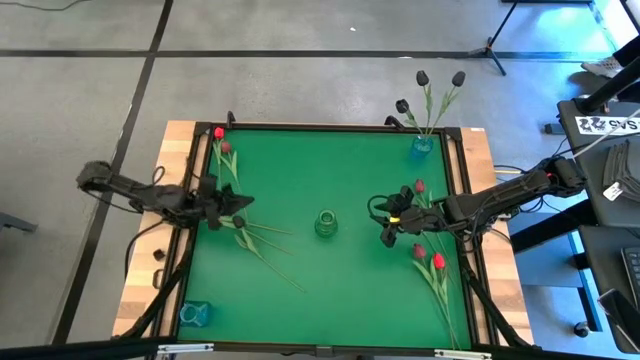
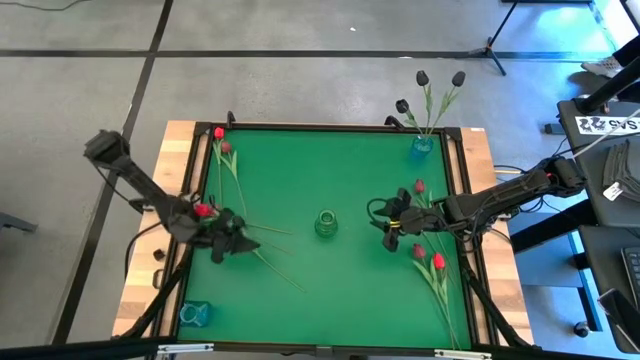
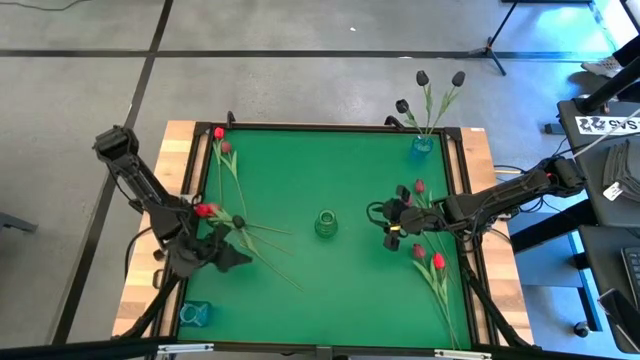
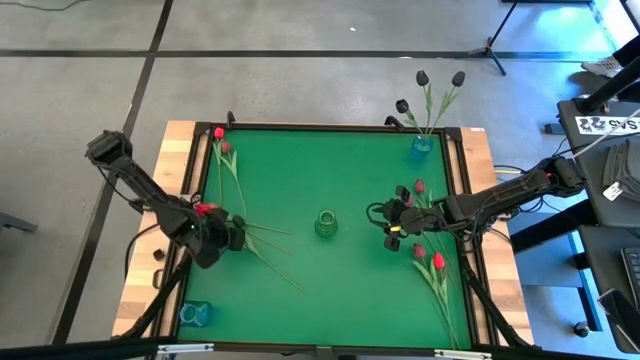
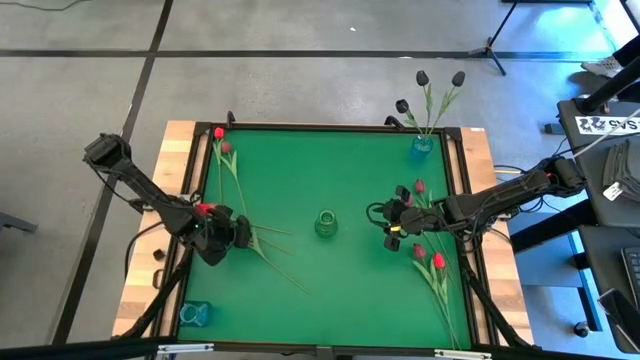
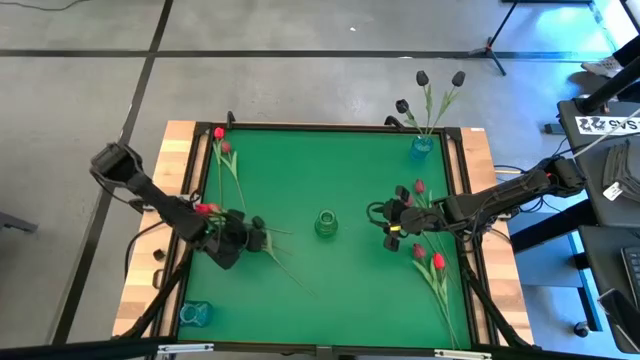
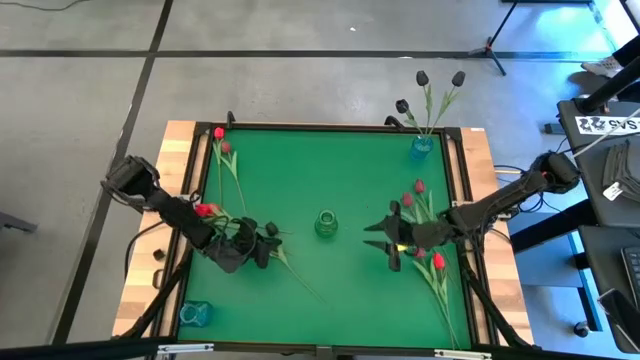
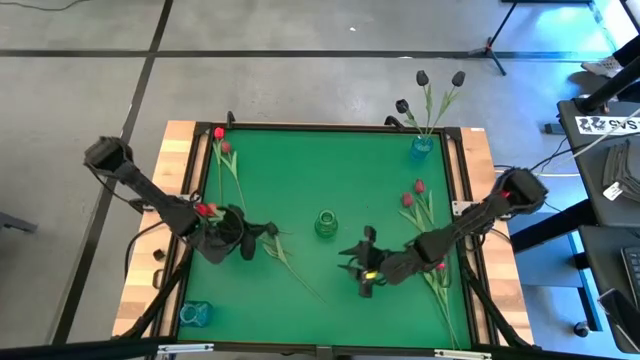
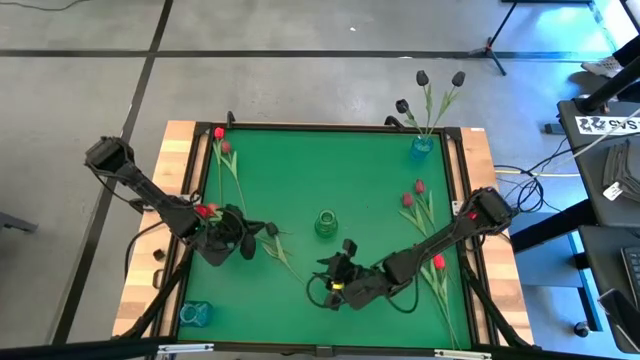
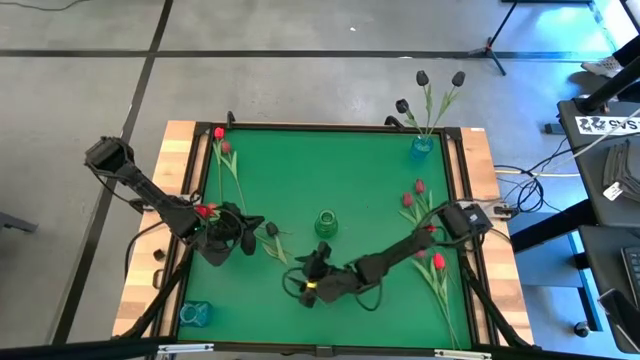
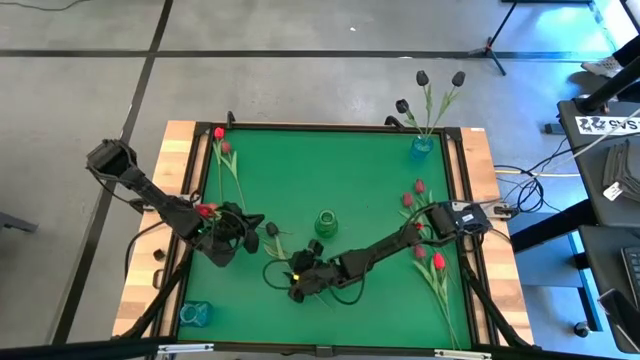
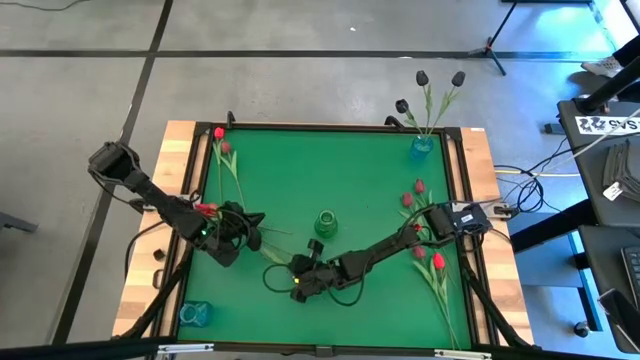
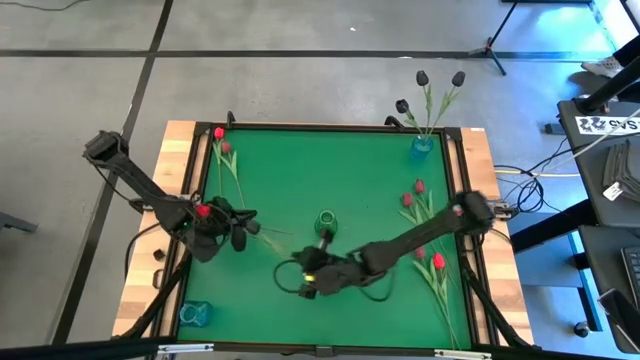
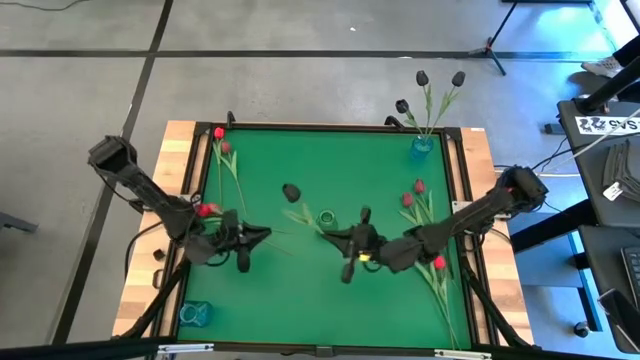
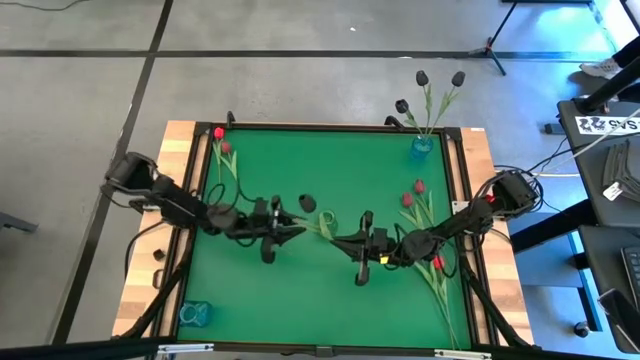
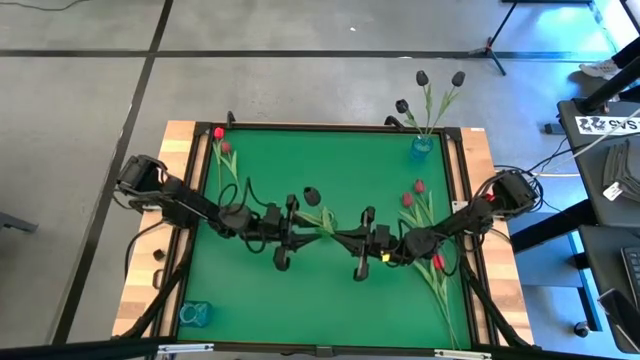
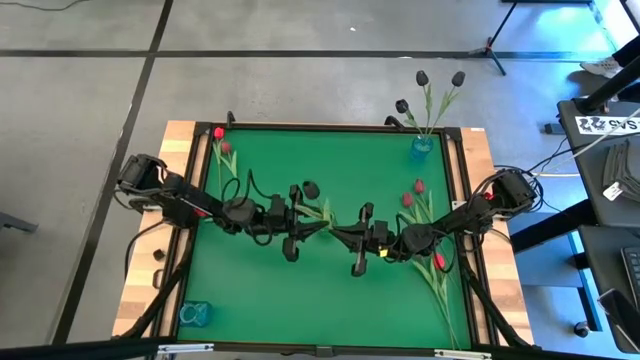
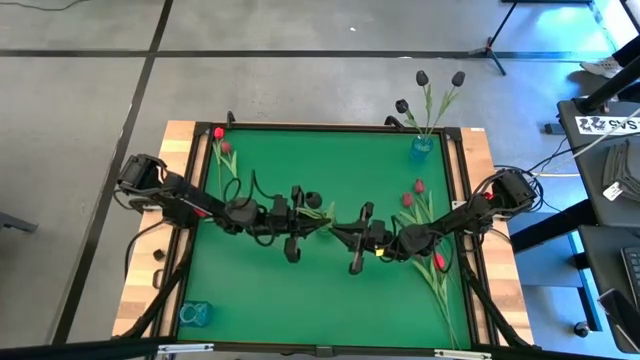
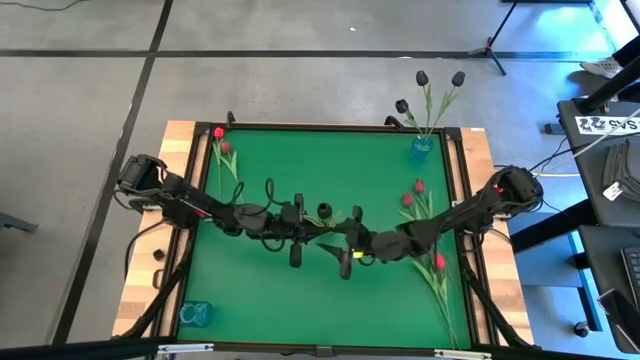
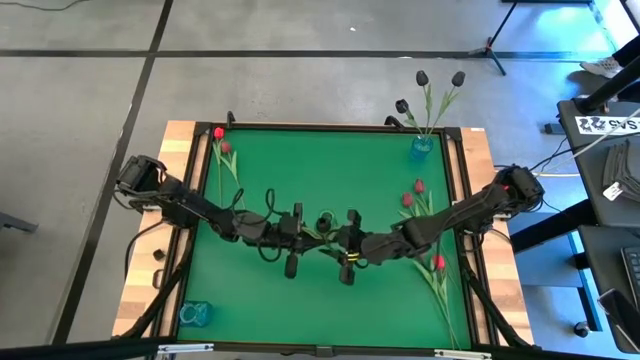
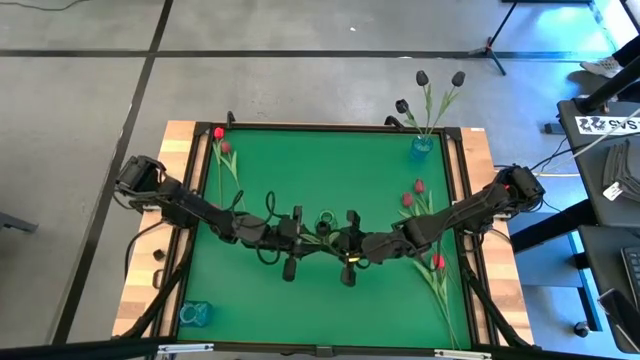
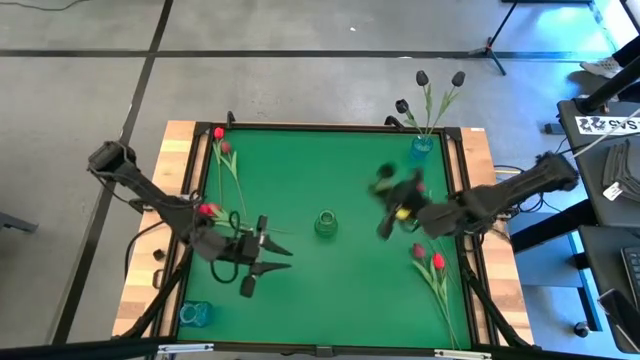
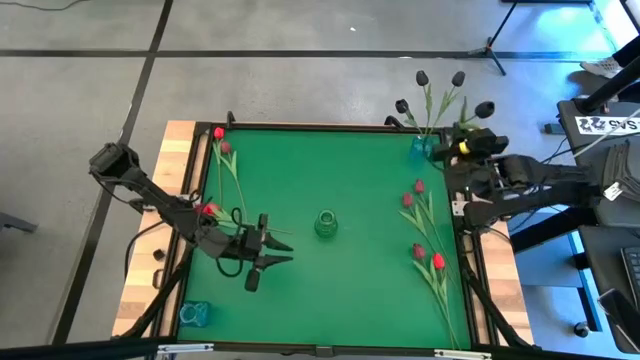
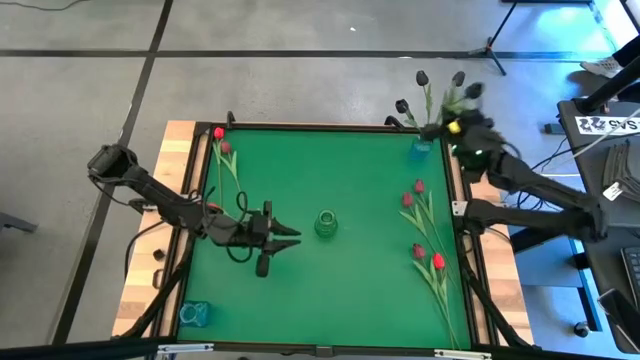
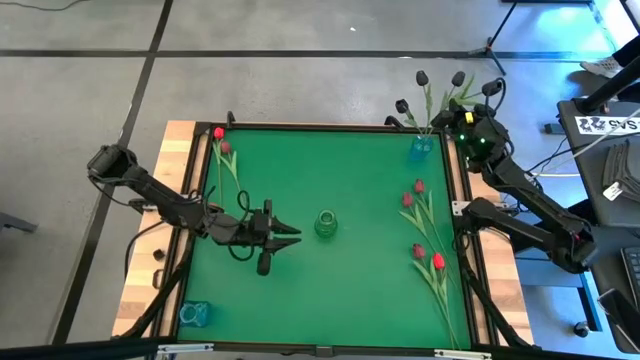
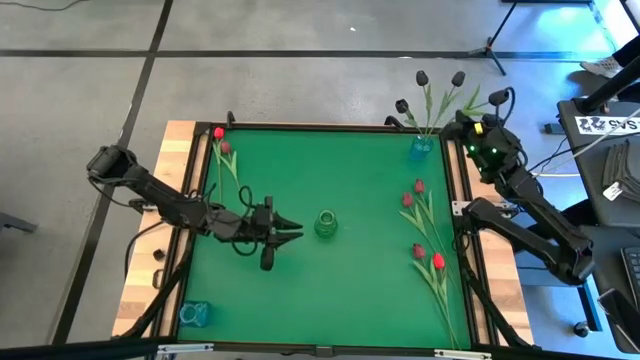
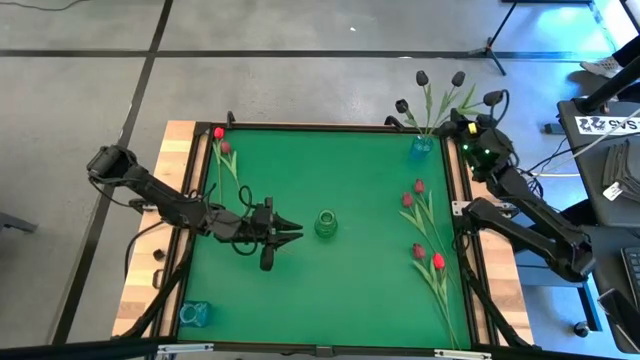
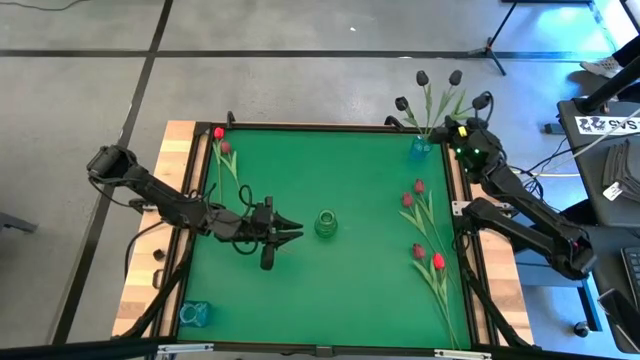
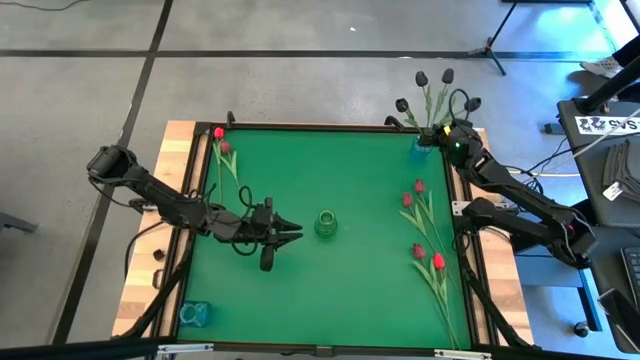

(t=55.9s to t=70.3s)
Task: Sort flowers into vase by color
Put the black flower into the top right blue vase

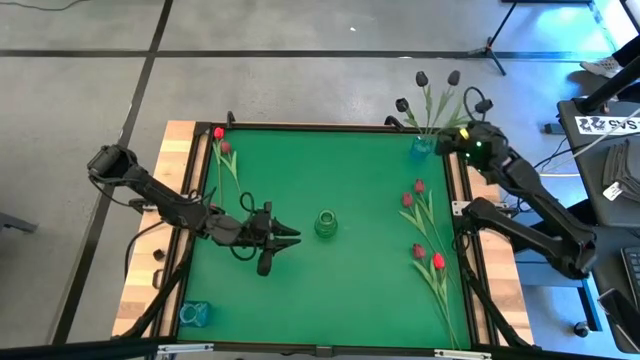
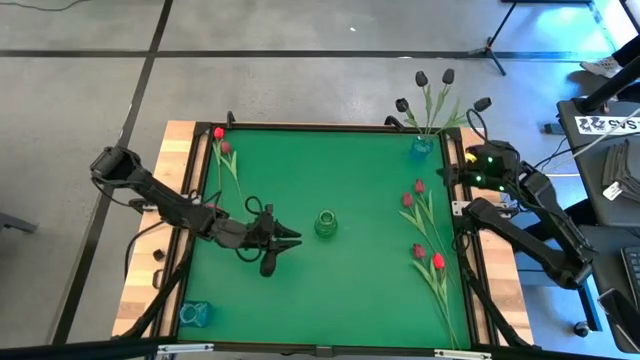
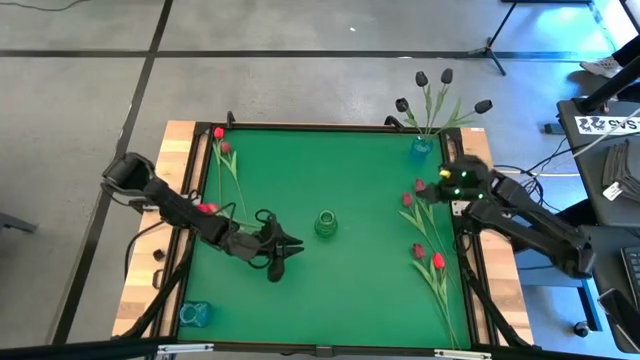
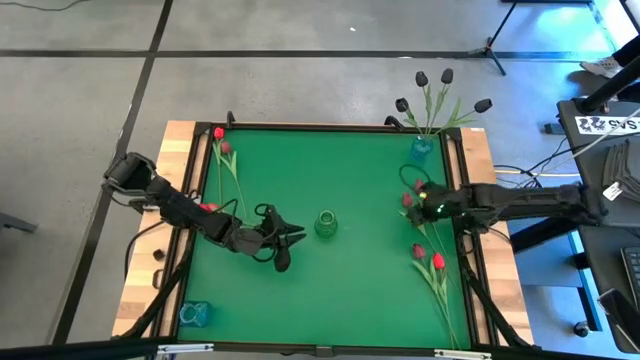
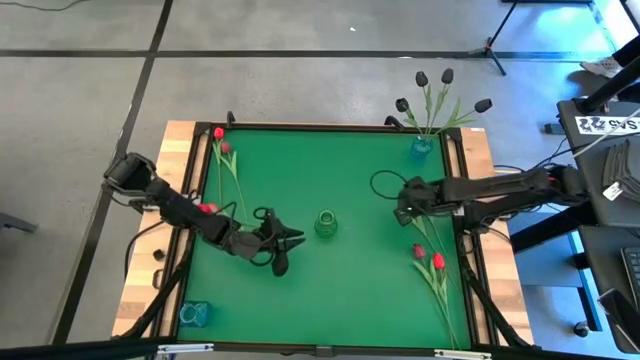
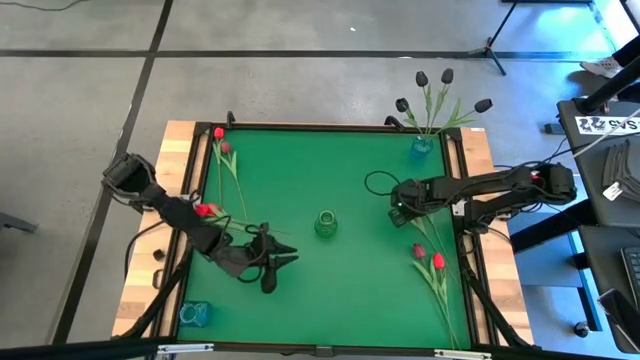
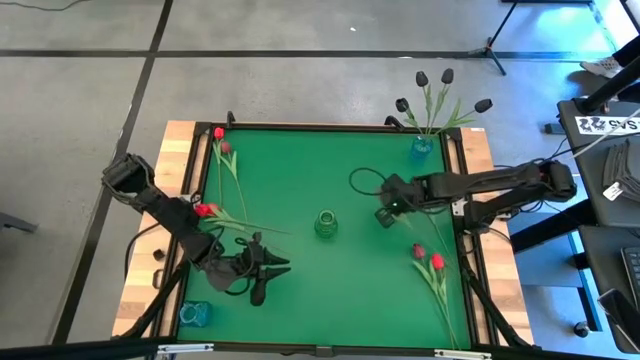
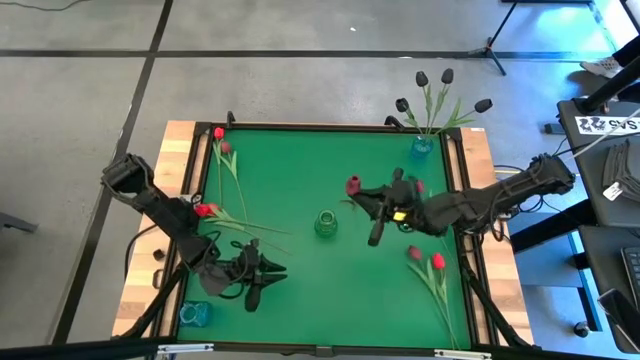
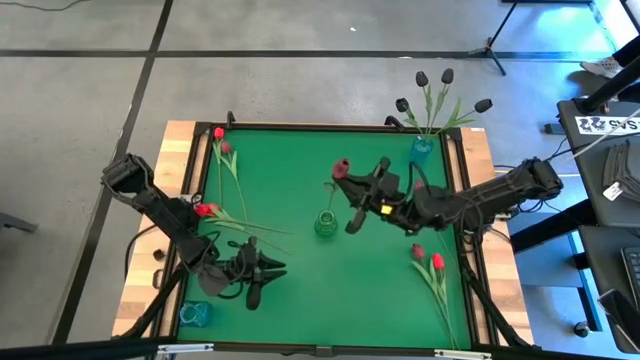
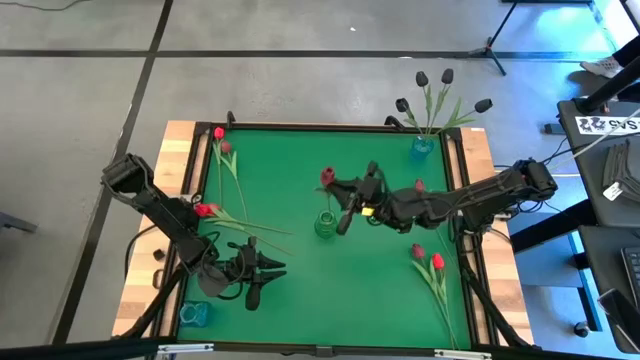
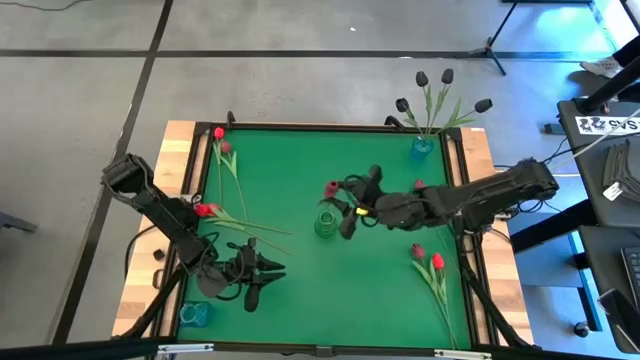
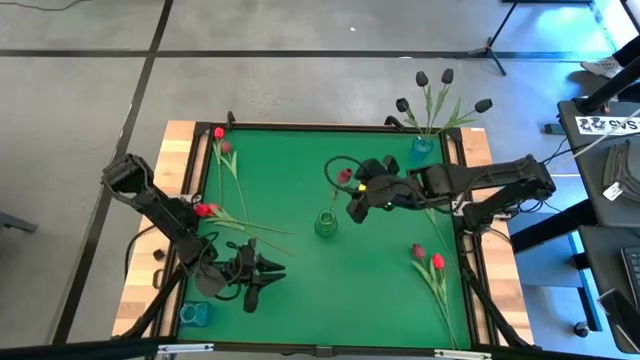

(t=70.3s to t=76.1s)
Put the middle right pink flower into the green vase

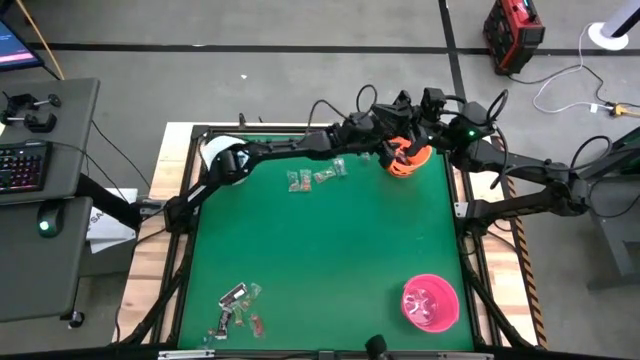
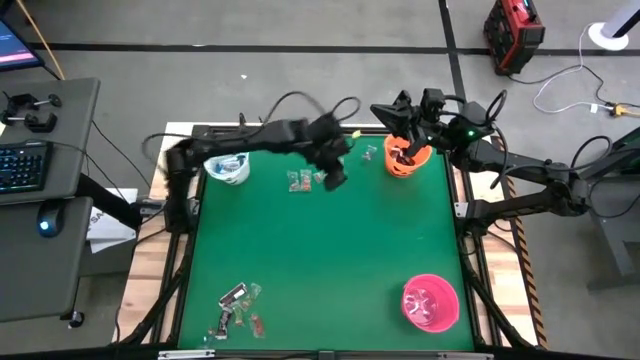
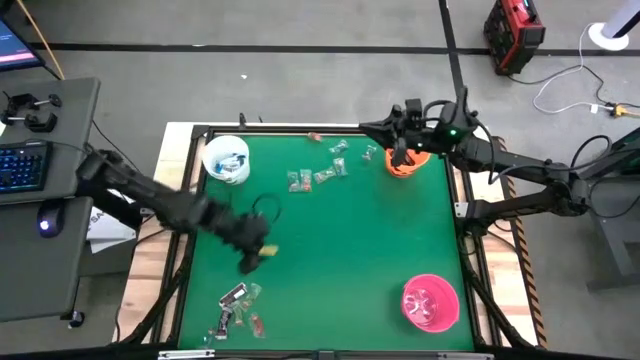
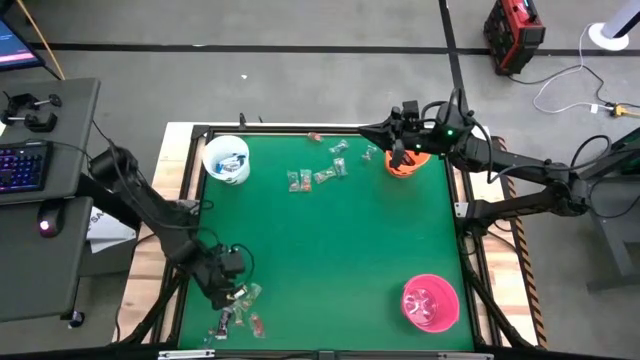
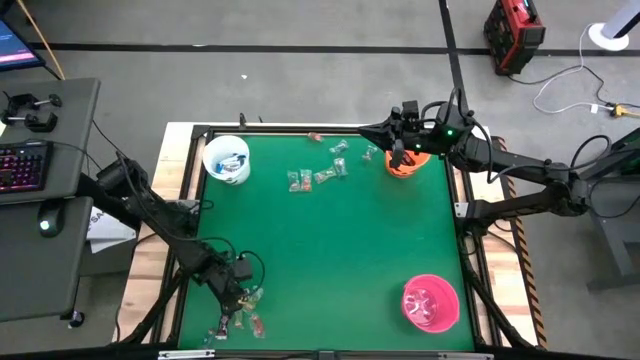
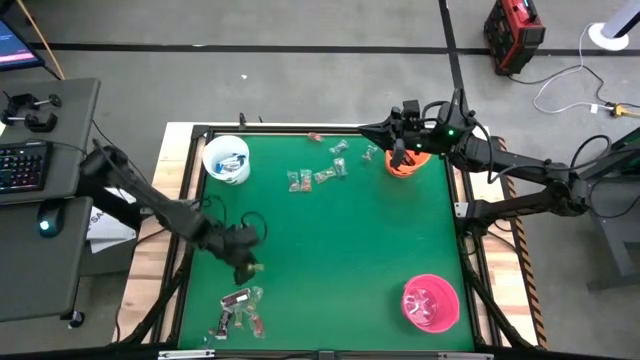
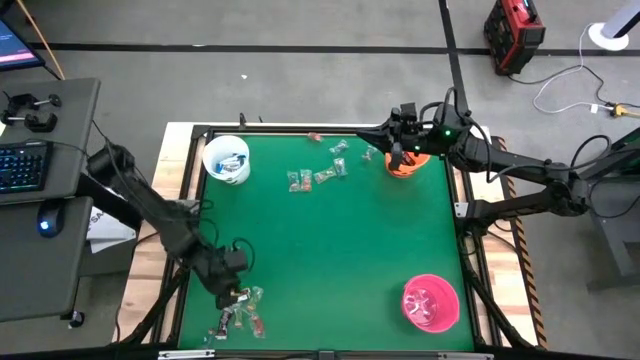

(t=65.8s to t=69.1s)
Task: Sort candy by brand, put in halloween buckets
Put the brown chocolate bar into the orange bucket
